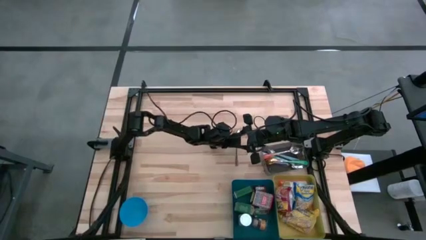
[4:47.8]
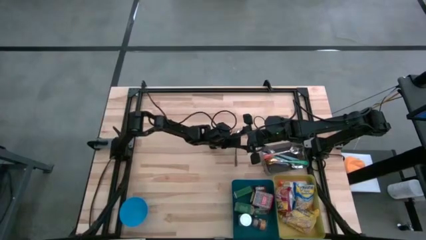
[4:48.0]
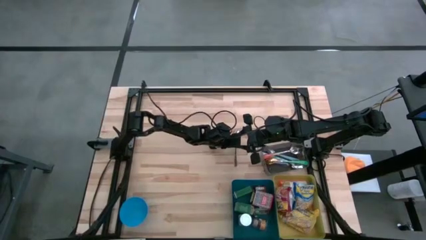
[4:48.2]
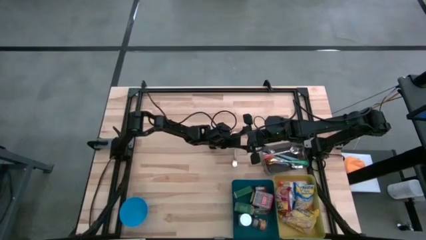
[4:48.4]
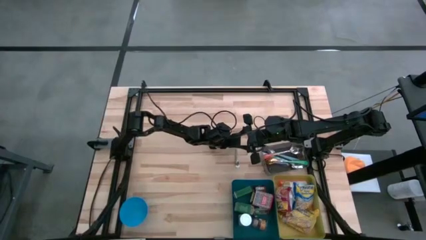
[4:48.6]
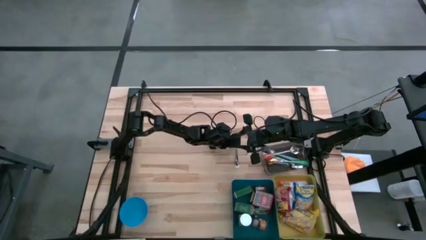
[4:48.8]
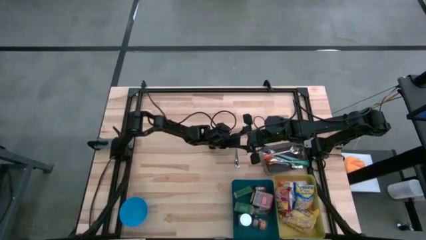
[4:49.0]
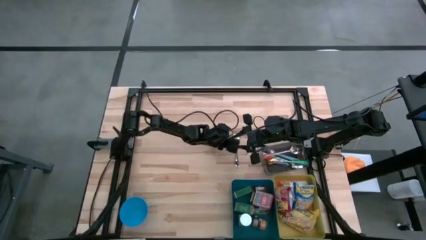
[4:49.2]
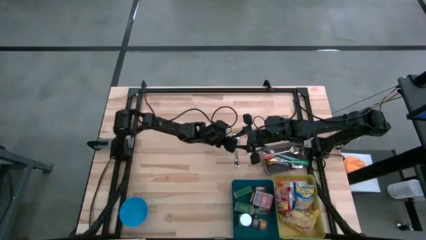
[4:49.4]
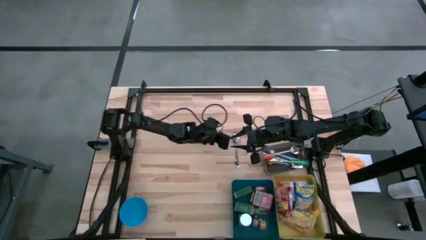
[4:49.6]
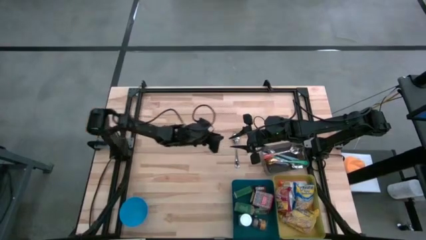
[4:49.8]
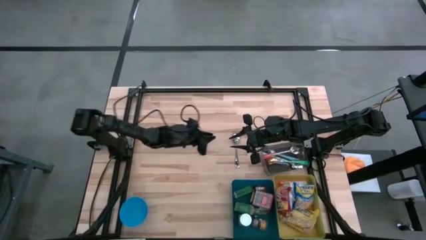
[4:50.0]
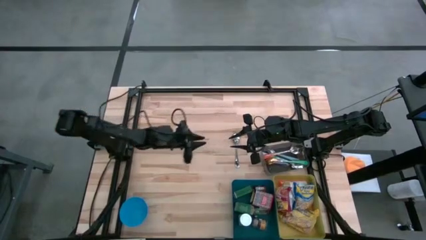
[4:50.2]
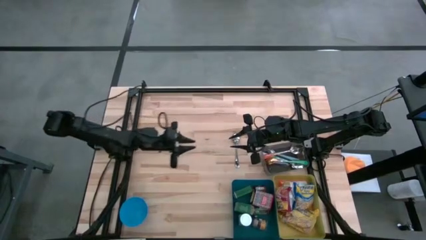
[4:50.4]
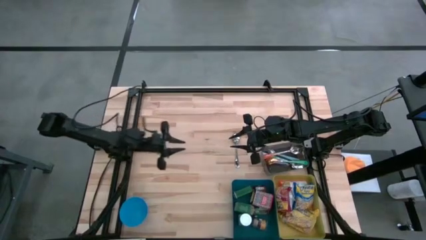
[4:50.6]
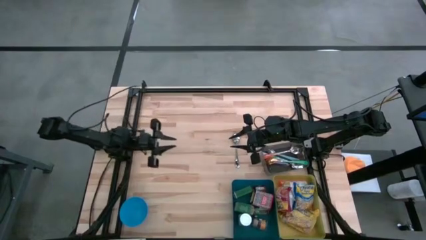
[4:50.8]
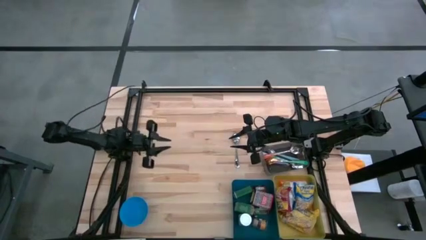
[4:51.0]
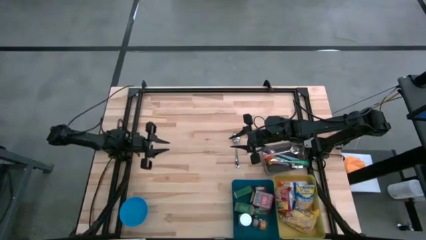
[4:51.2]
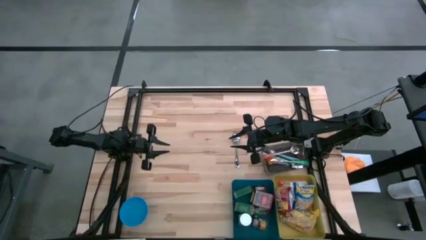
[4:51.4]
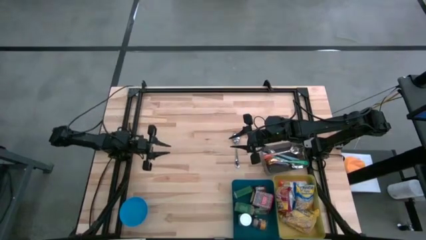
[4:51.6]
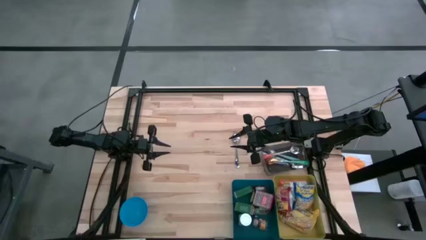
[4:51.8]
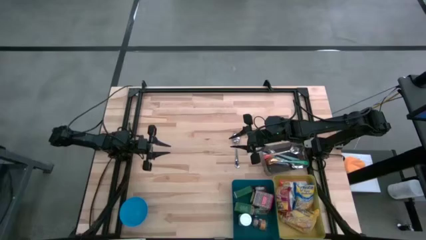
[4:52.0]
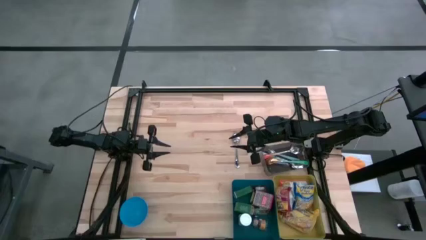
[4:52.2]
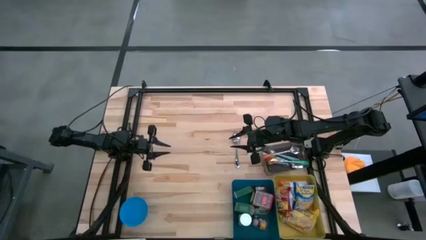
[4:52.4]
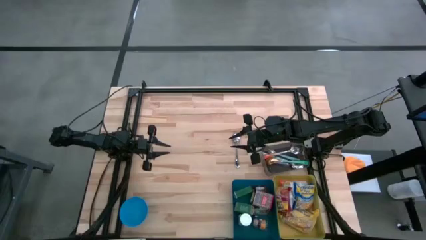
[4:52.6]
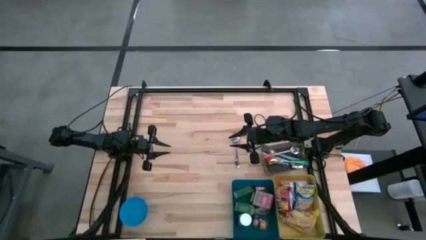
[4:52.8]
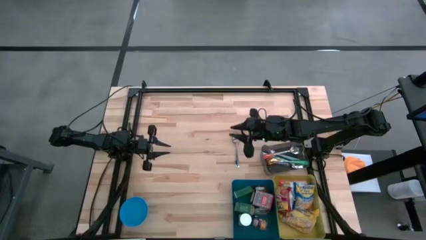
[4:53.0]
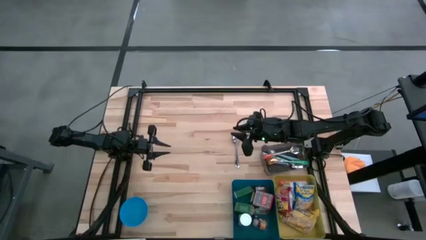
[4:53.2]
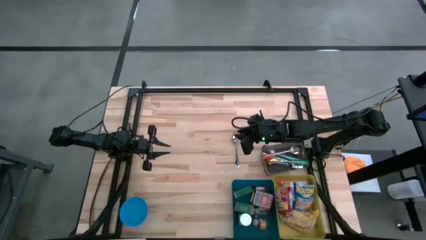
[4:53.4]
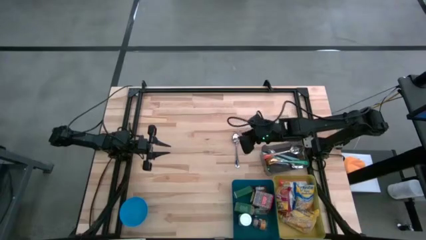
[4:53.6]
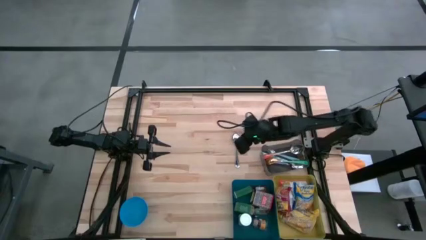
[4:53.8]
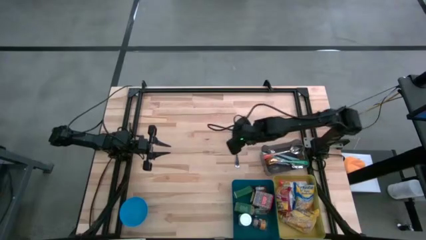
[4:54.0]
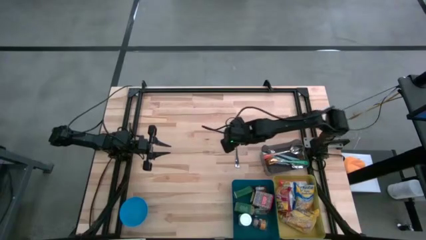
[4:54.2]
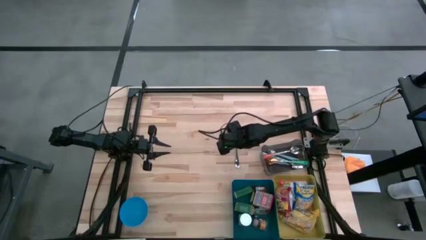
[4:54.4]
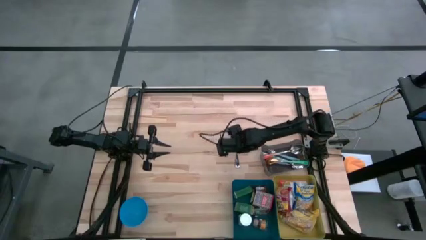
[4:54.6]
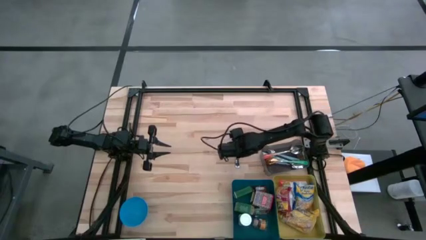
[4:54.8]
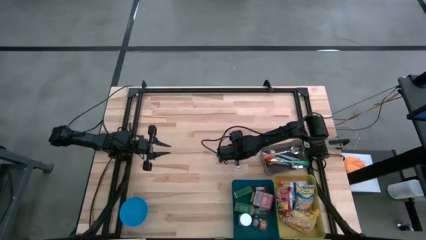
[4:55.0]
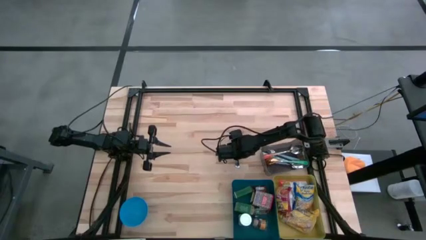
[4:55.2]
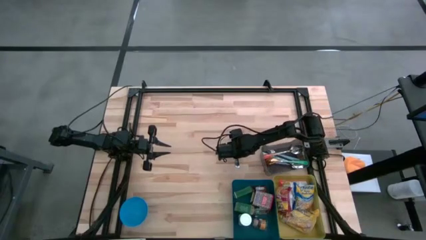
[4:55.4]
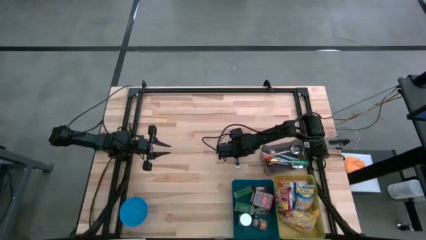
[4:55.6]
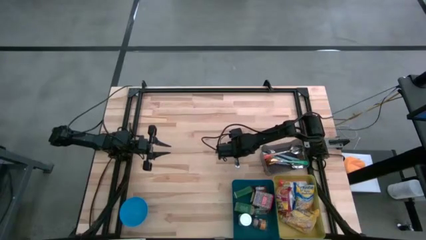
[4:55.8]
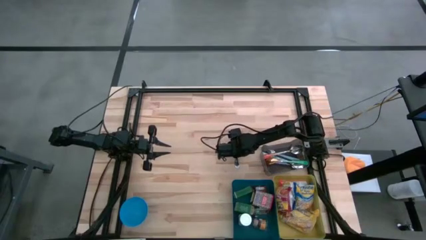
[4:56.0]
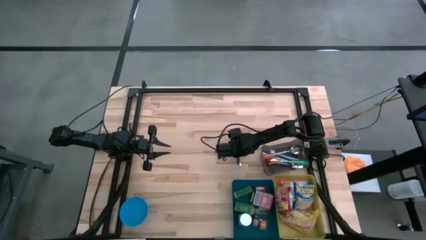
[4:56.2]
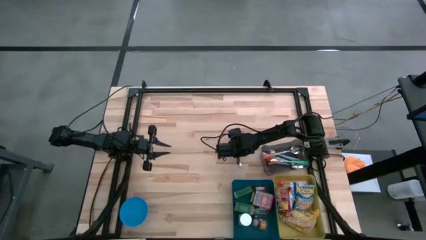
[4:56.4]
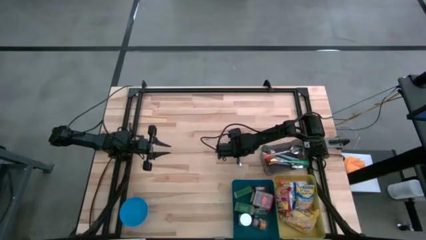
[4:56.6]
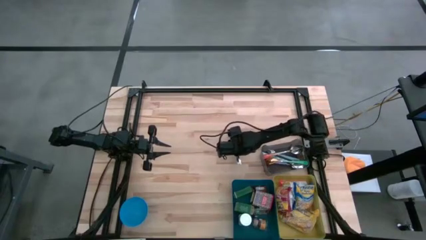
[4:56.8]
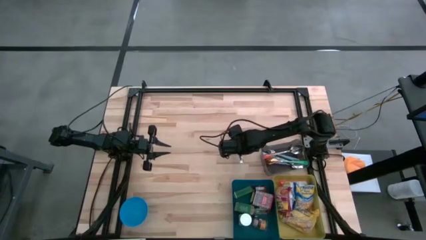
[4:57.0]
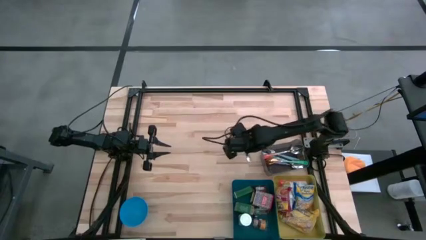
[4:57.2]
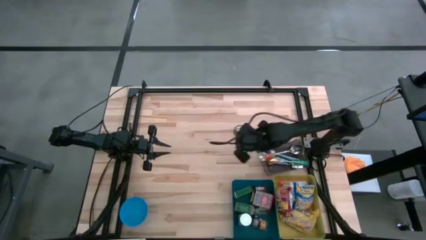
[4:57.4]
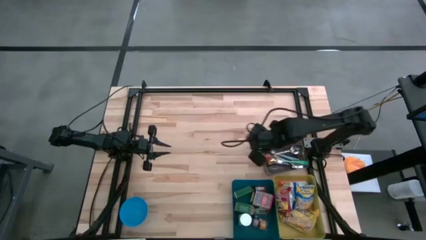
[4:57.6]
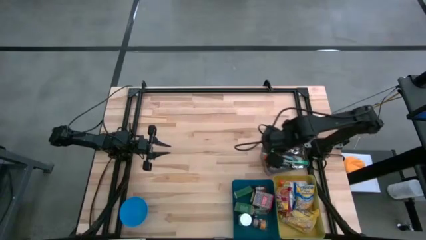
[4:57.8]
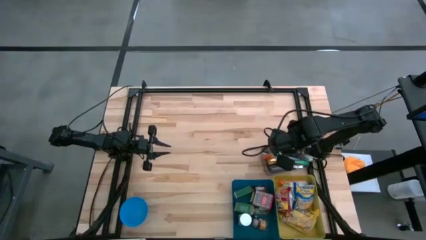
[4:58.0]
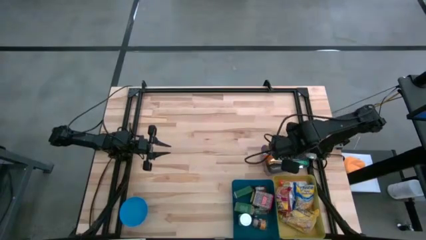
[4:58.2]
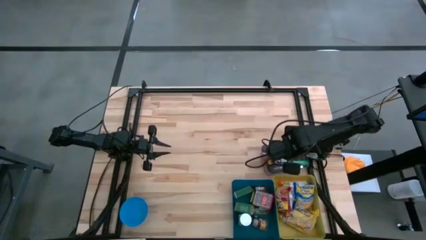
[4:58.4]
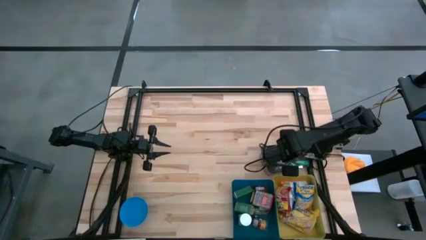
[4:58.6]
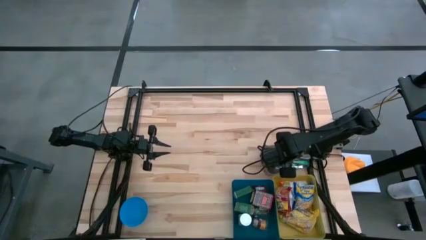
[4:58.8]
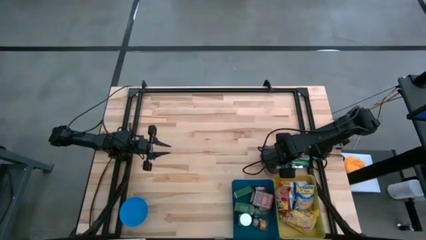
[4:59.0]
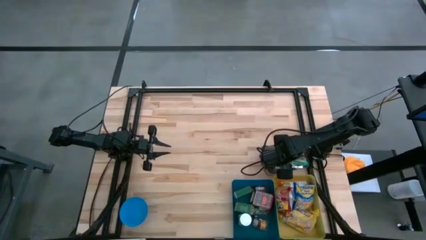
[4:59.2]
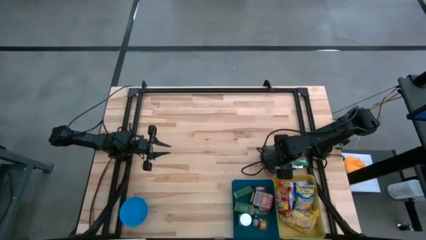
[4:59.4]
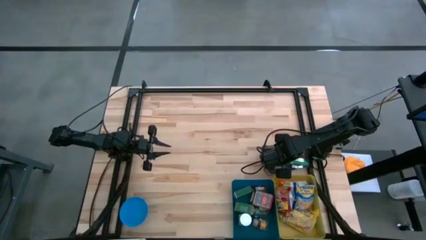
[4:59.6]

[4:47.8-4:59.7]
Put the silver spoon into the black bin
